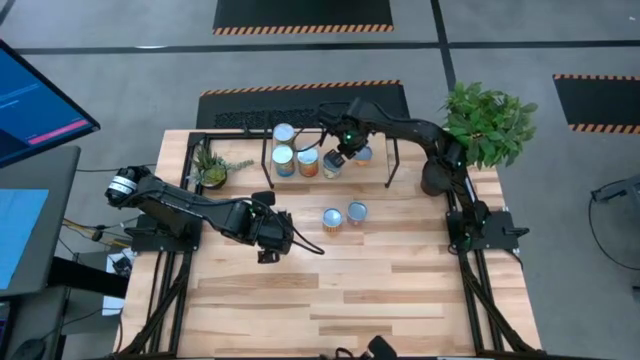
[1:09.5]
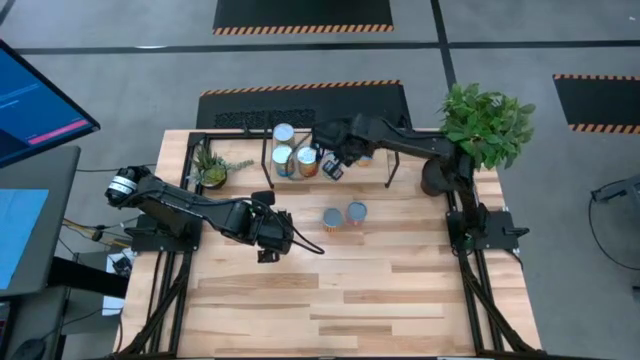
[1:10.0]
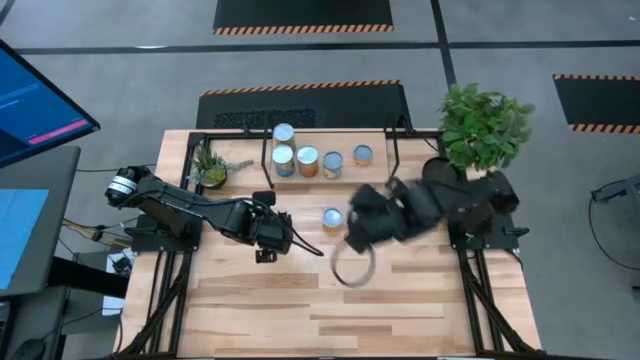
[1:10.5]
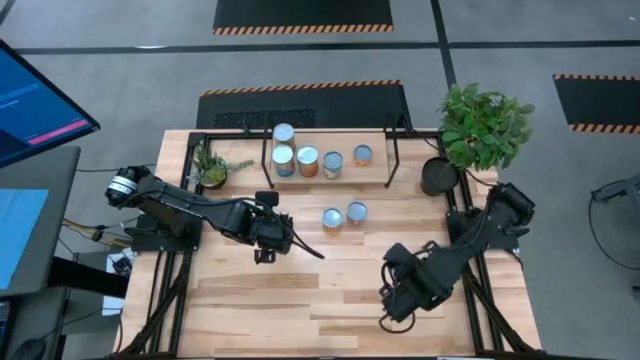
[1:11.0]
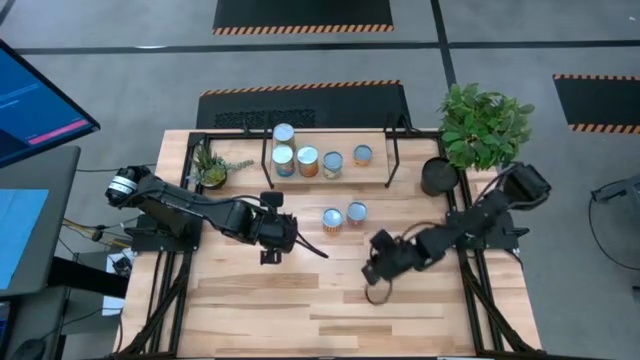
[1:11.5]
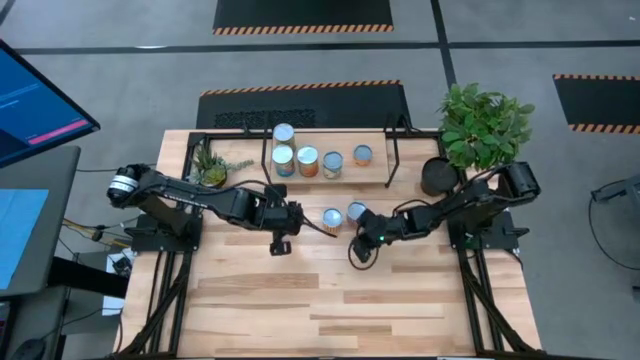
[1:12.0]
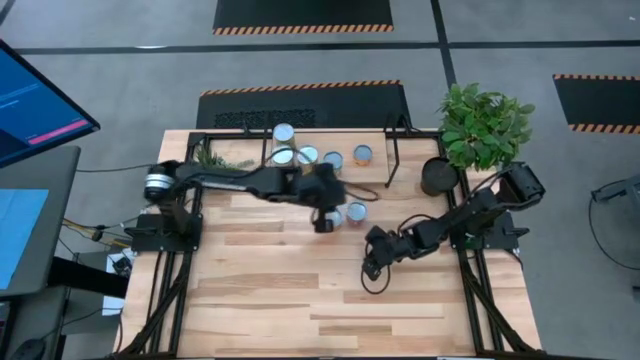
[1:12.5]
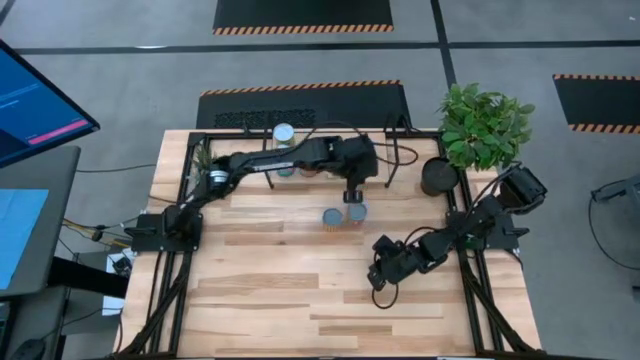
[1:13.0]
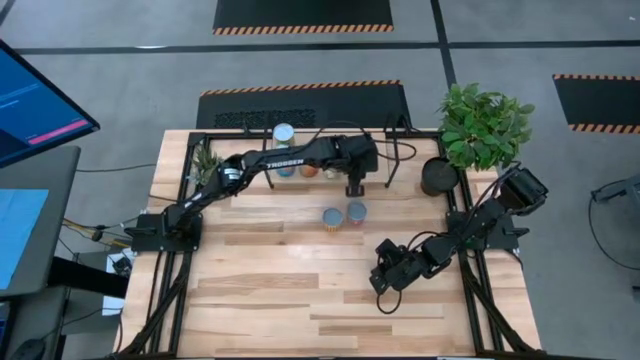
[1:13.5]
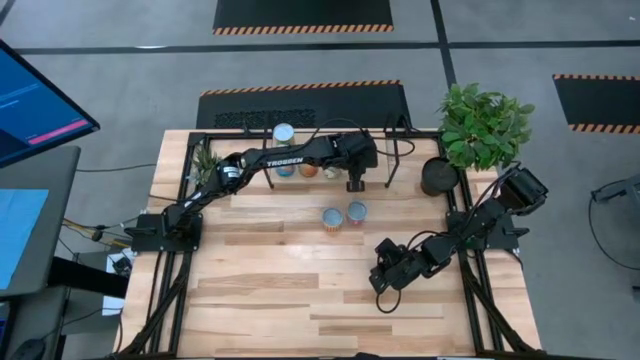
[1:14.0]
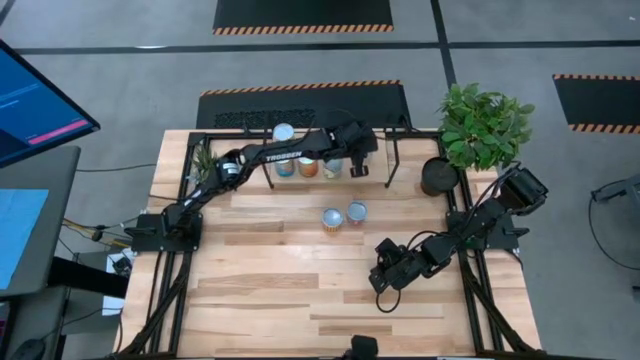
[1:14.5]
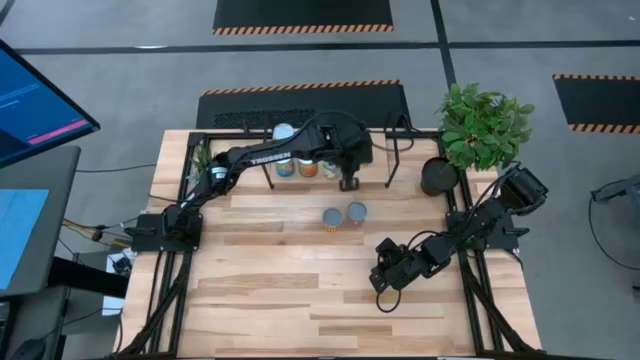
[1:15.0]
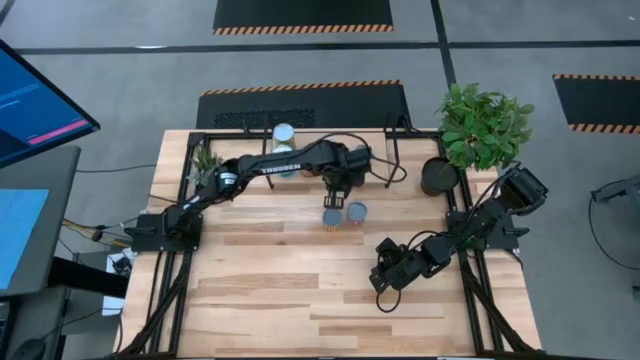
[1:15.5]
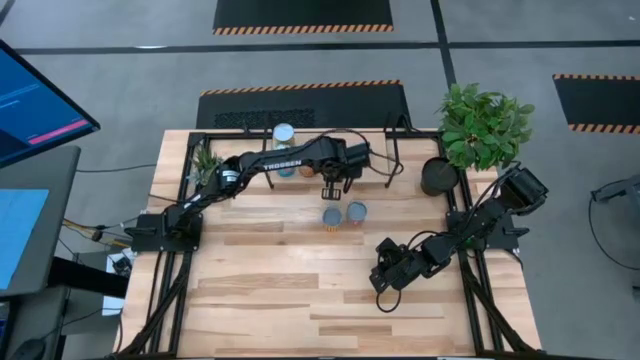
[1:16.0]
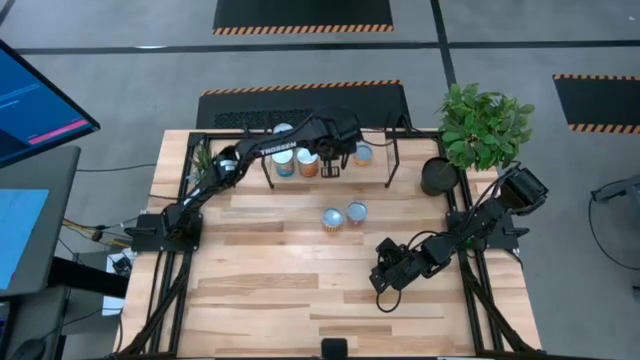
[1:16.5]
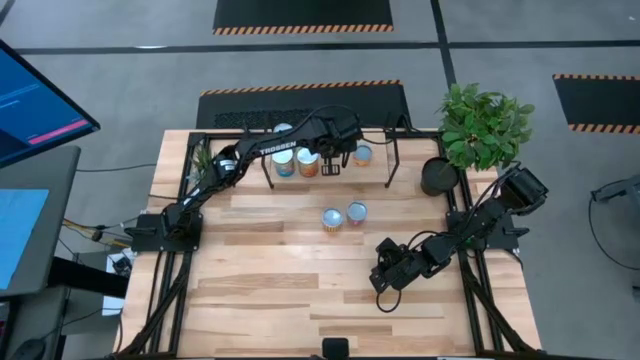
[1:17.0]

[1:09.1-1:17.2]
Task: Pick and place cans onto a shelf
Adjust the canned chicken soup on the shelf

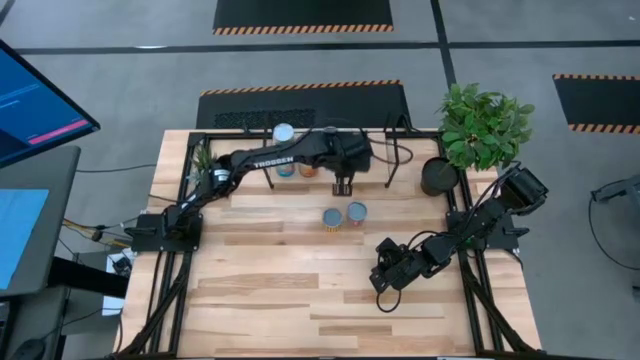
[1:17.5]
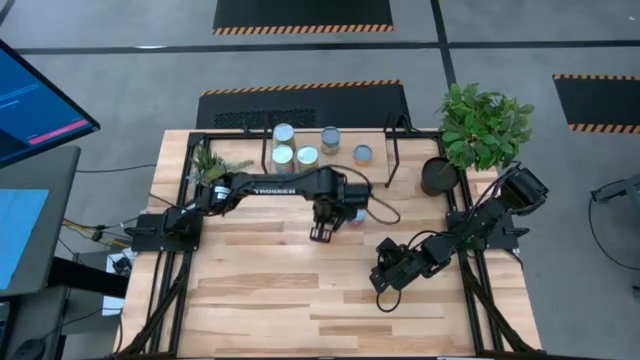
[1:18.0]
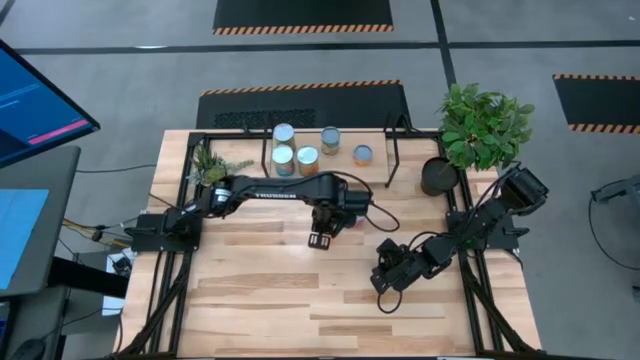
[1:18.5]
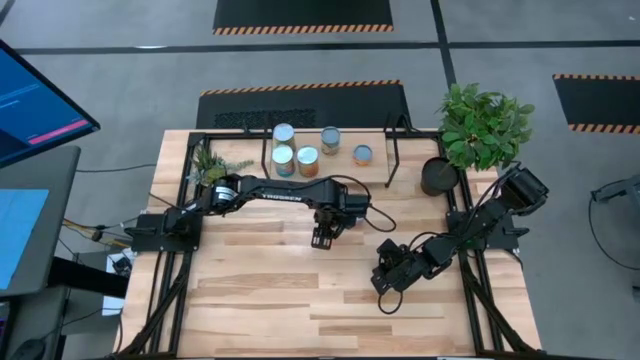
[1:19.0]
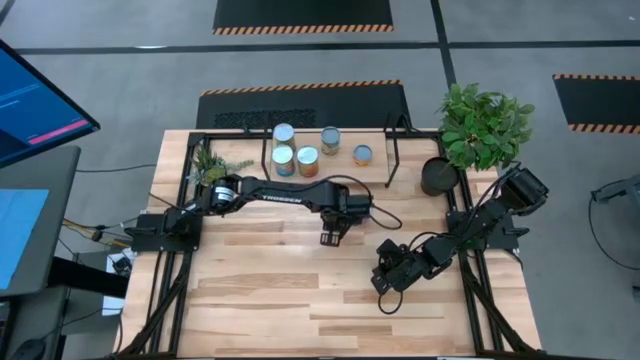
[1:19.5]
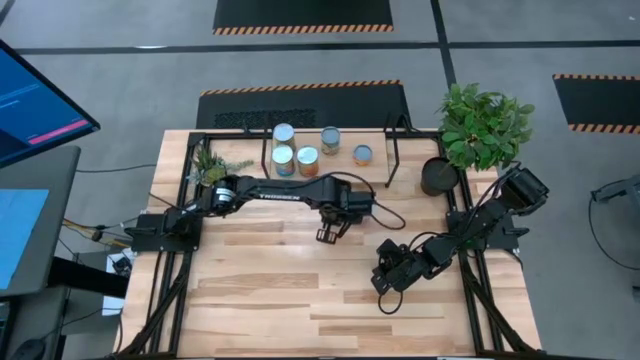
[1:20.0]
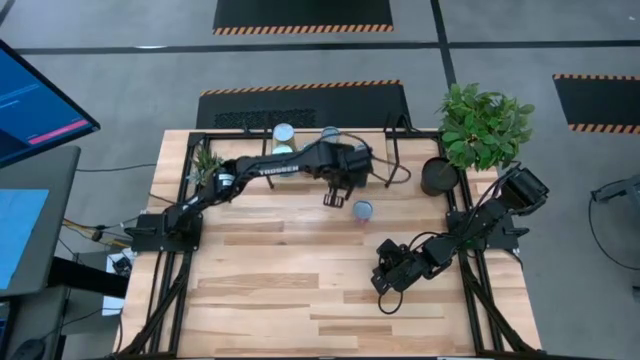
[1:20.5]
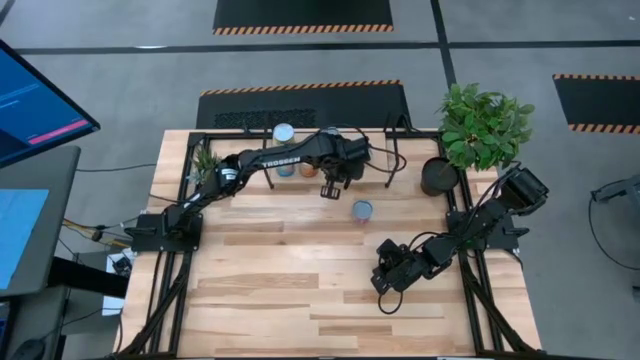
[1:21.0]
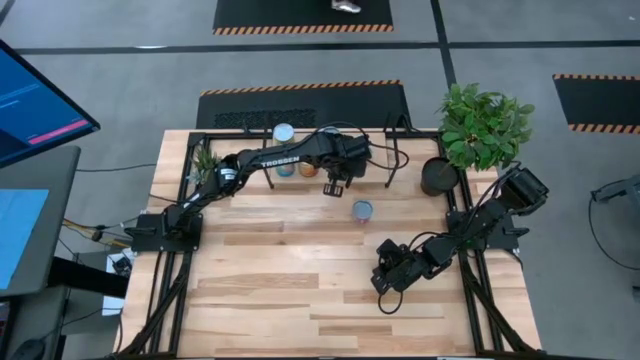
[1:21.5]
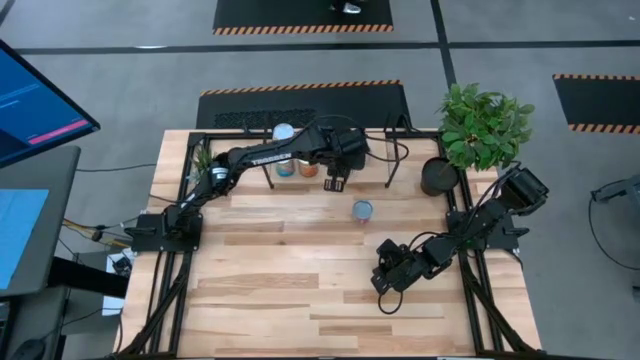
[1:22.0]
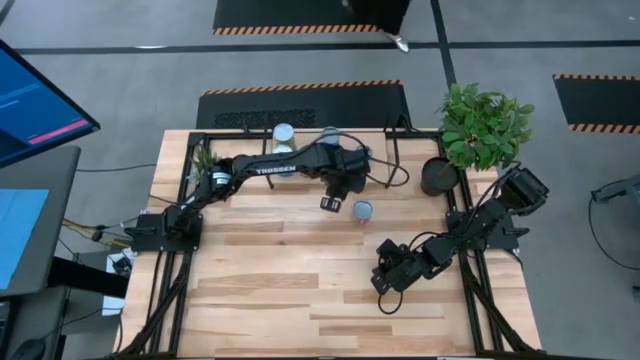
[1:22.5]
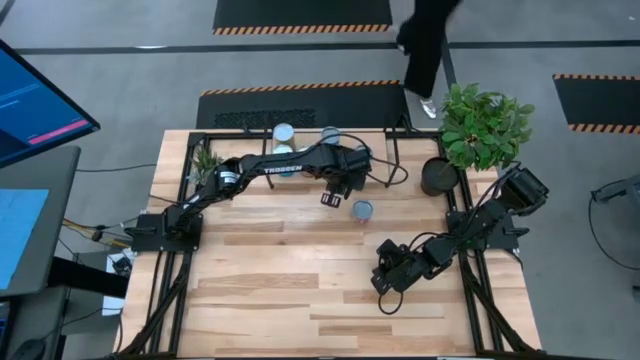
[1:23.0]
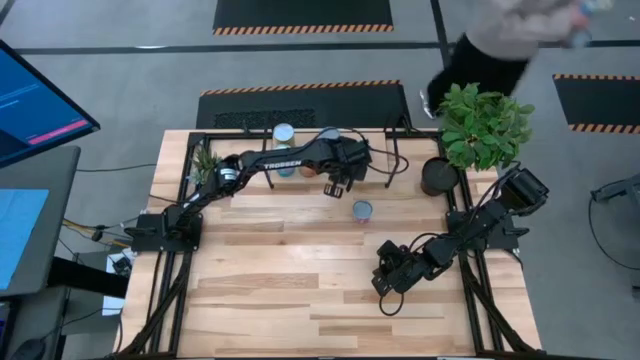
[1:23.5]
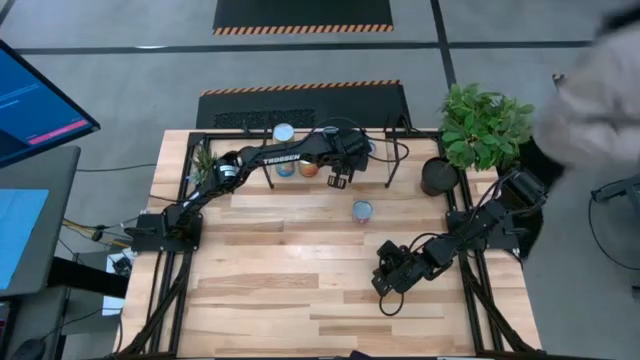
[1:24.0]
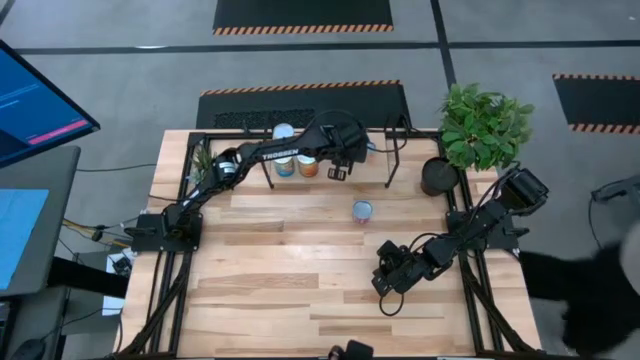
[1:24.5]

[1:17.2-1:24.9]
Put the canned peppers on the shelf

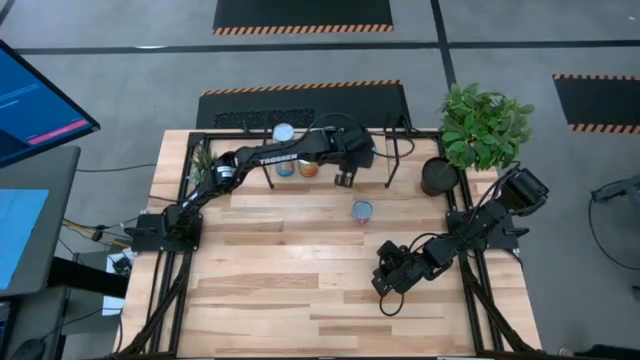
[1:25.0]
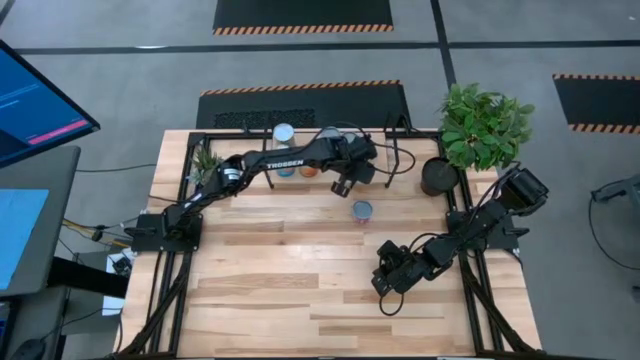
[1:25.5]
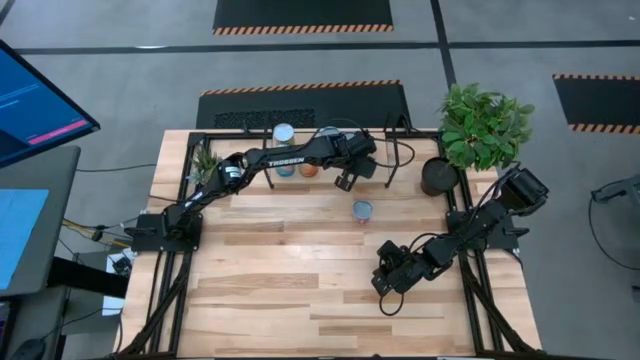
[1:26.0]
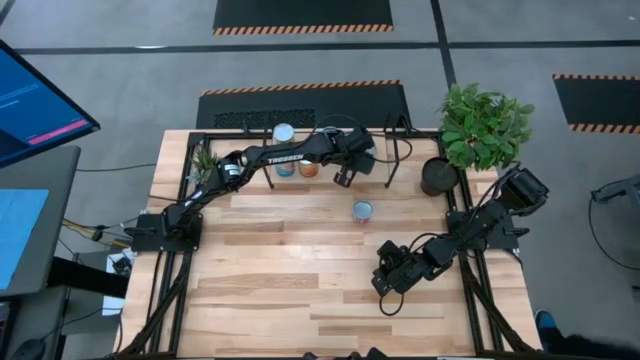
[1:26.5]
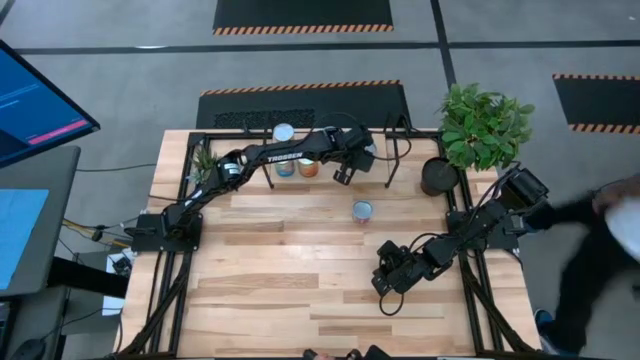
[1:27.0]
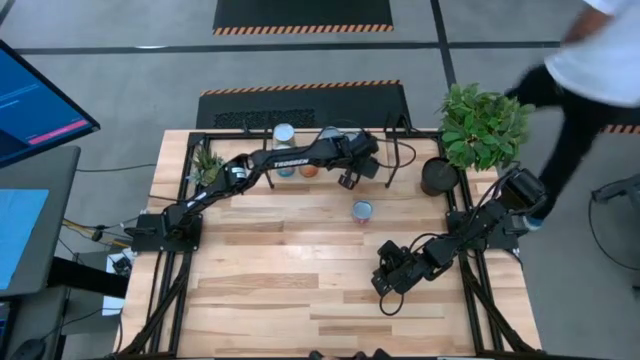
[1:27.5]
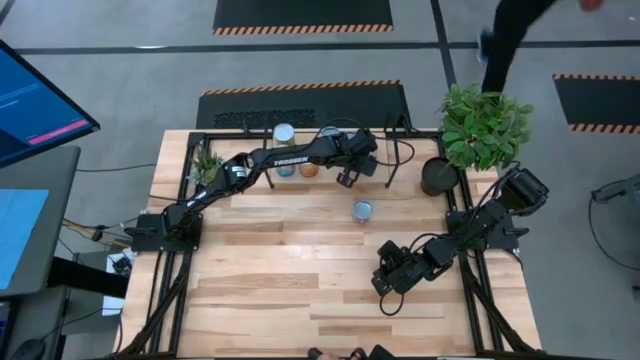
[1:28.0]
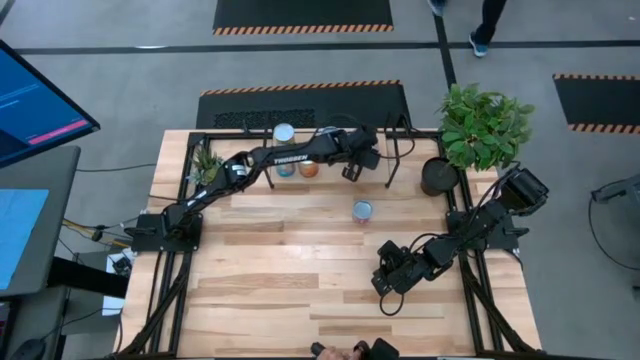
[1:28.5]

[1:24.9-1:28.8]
Adjust the canned pineapple on the shelf

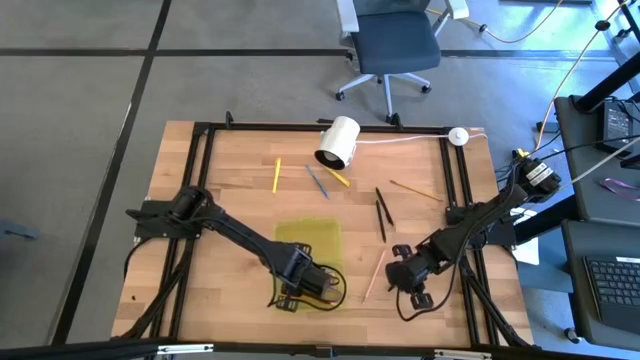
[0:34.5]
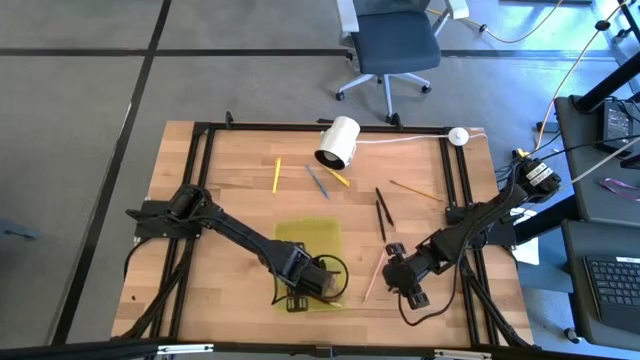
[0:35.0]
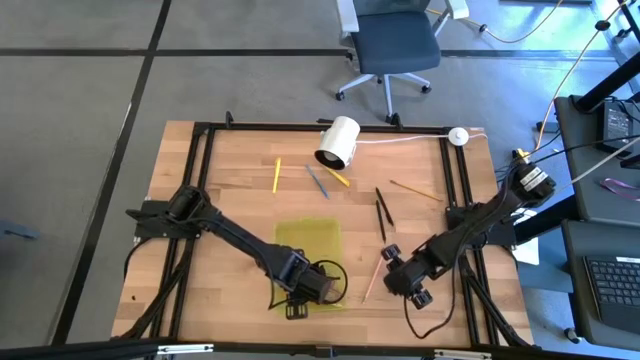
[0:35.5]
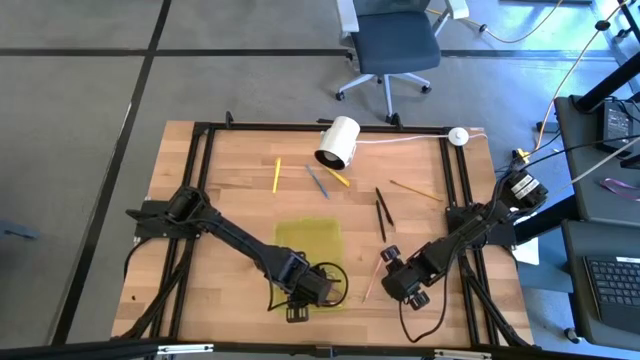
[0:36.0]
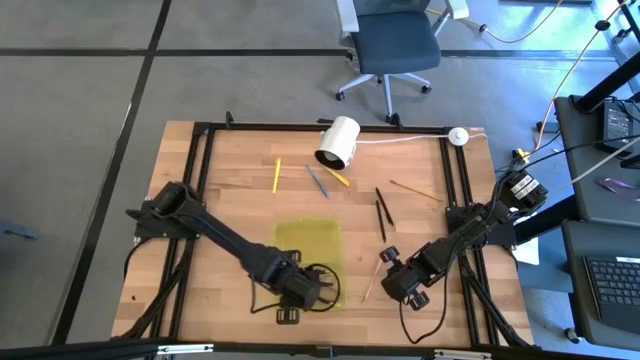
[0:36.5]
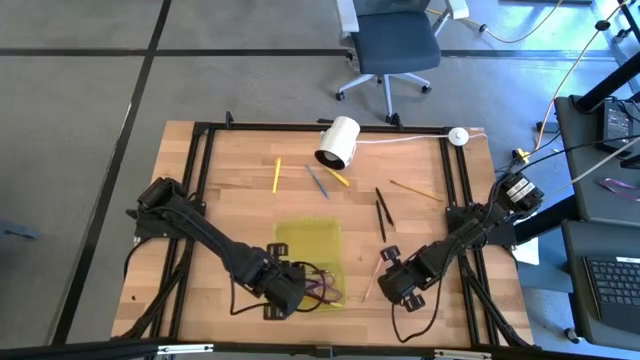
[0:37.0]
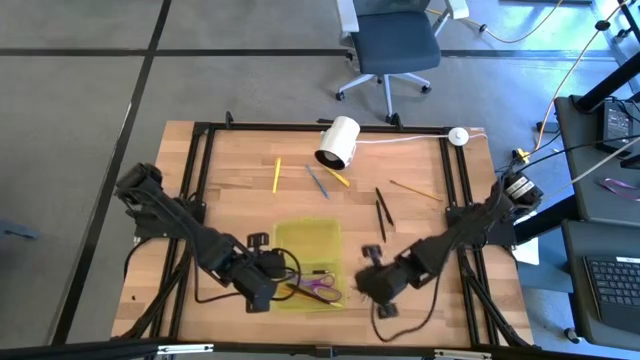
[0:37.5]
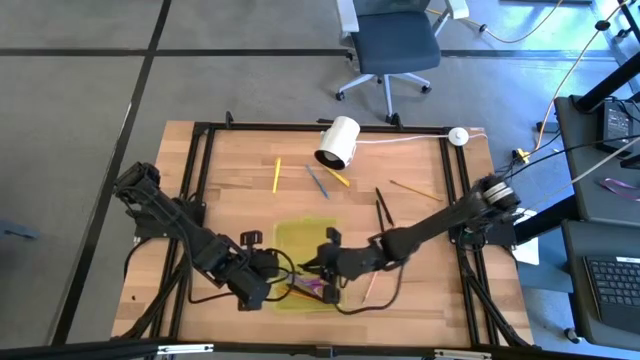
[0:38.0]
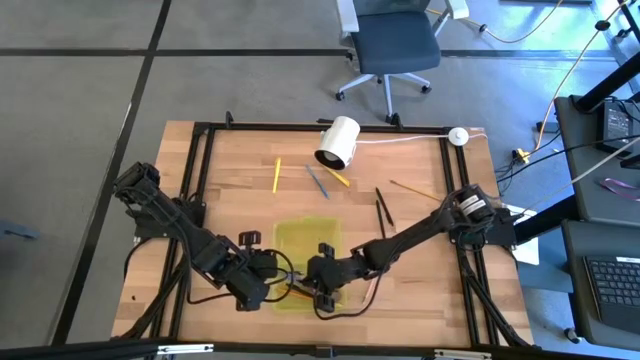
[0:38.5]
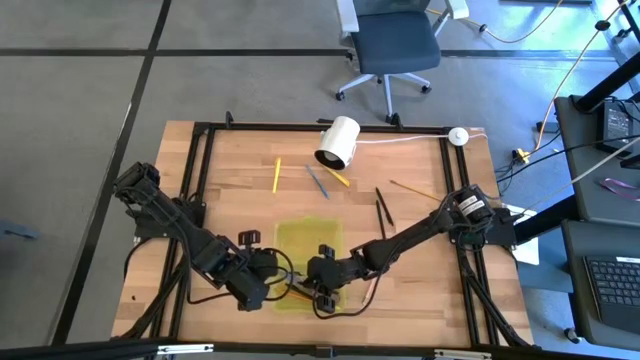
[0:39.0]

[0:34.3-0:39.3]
Task: Pick & place school supplies into a supply box
Put the black pen into the yellow supply box
